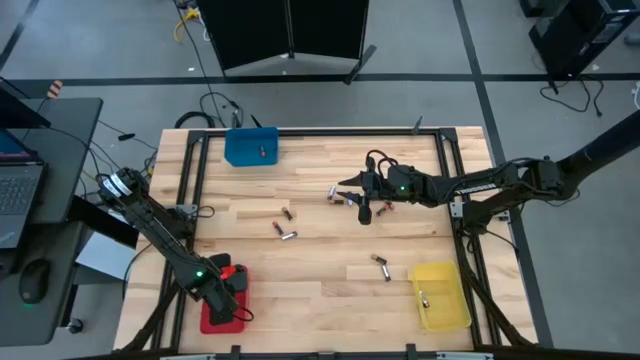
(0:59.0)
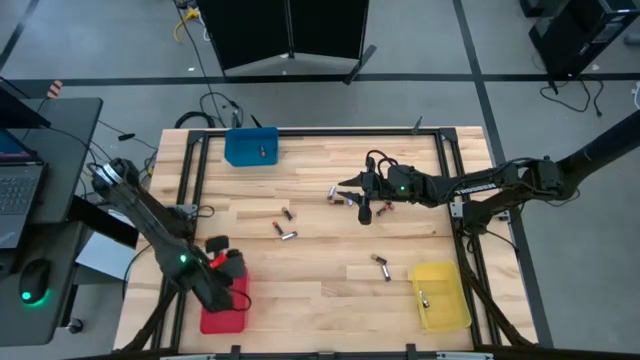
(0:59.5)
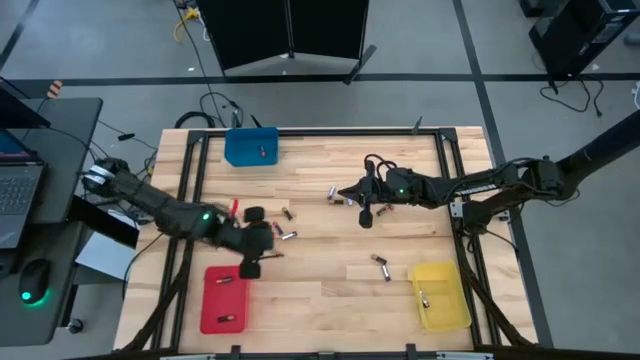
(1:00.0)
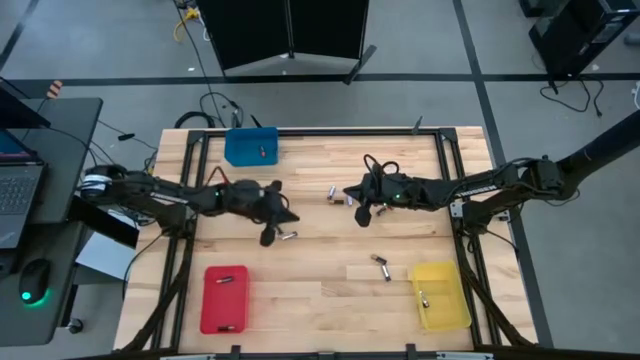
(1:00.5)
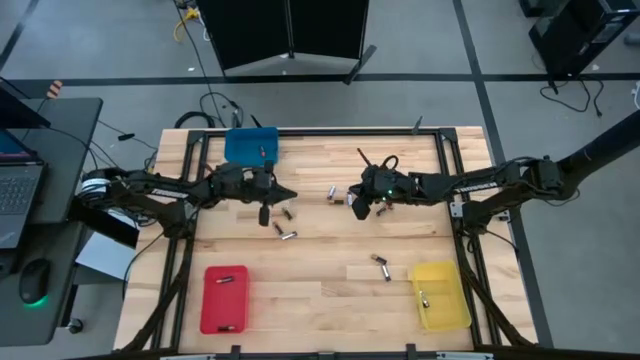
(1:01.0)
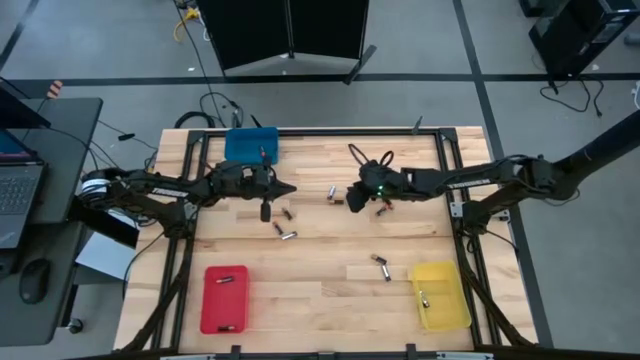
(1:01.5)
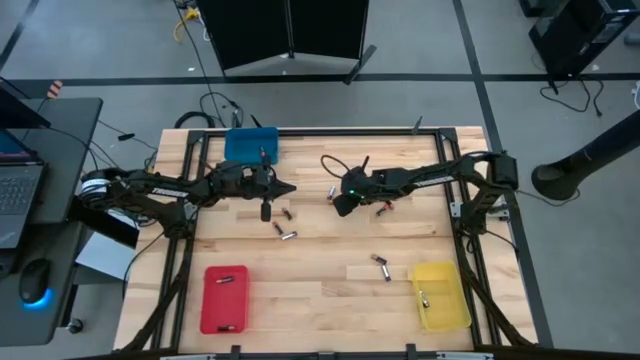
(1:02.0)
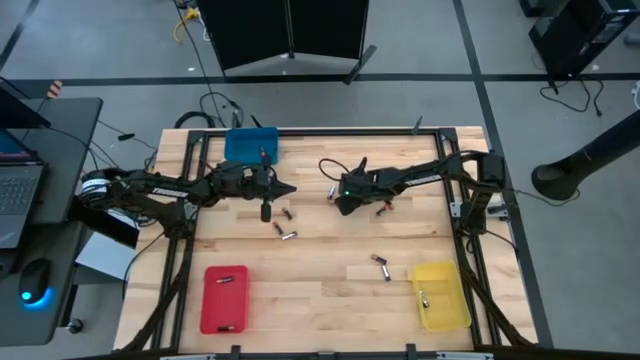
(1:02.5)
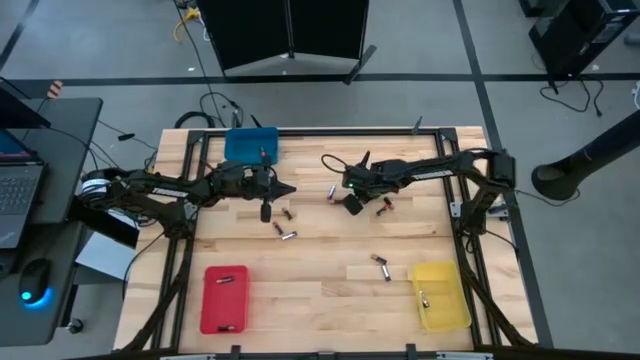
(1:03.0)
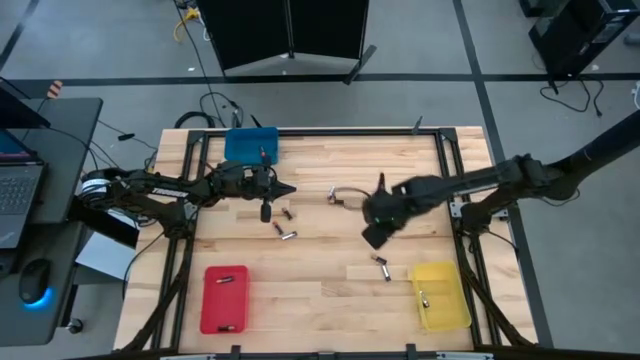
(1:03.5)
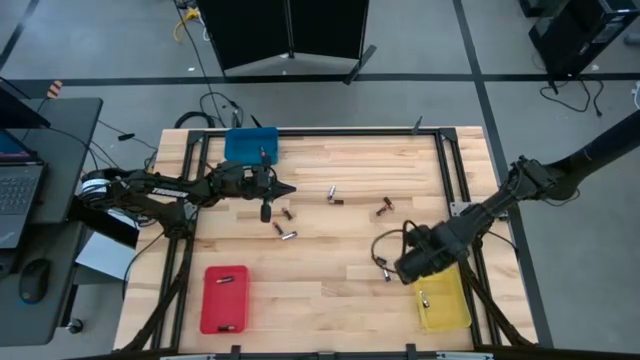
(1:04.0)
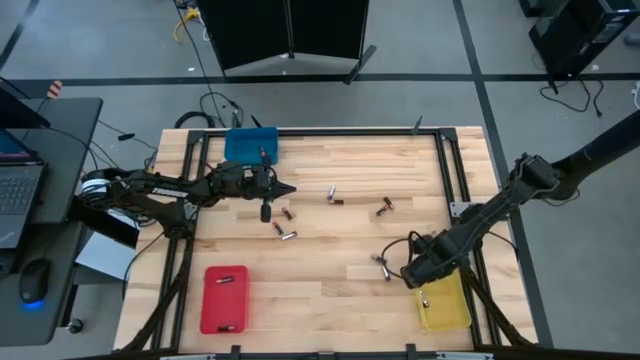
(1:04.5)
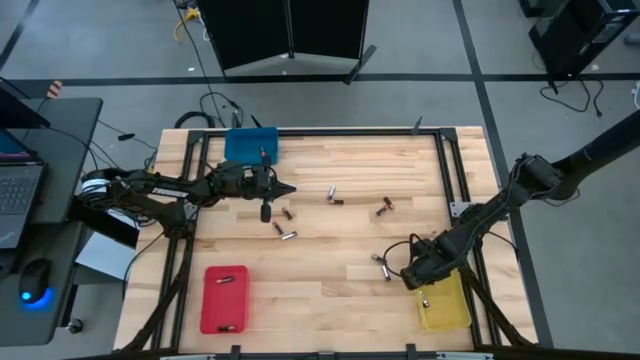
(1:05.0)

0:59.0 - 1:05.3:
Task: Sort batteries
Put the silver battery into the yellow bin

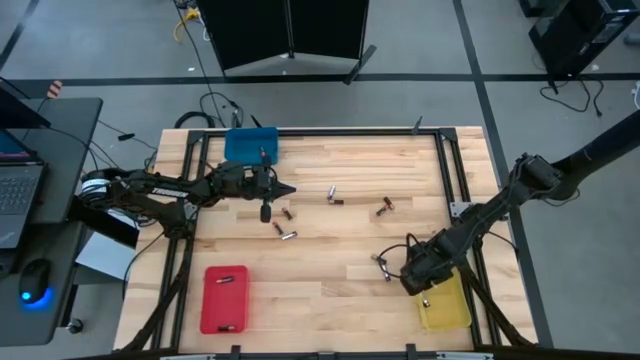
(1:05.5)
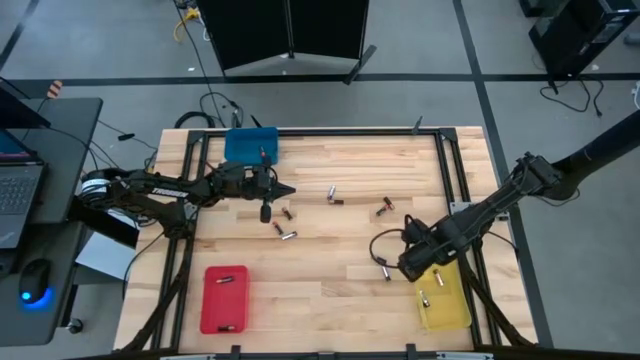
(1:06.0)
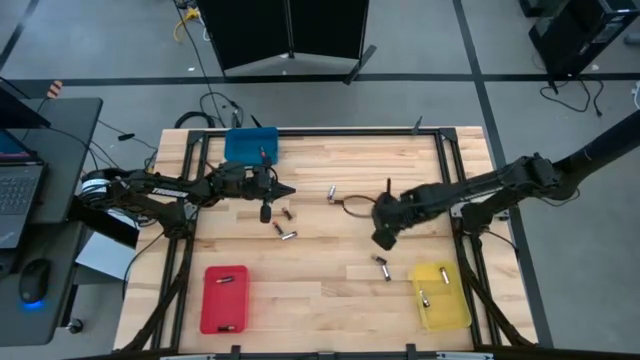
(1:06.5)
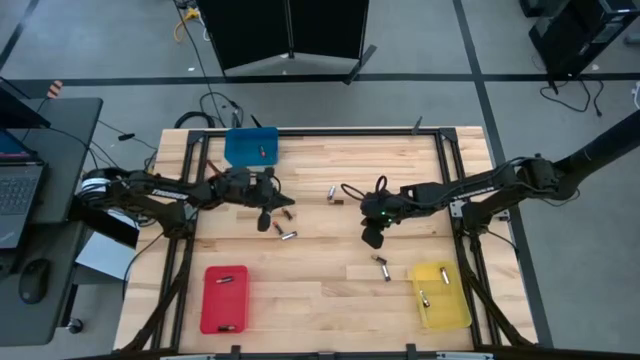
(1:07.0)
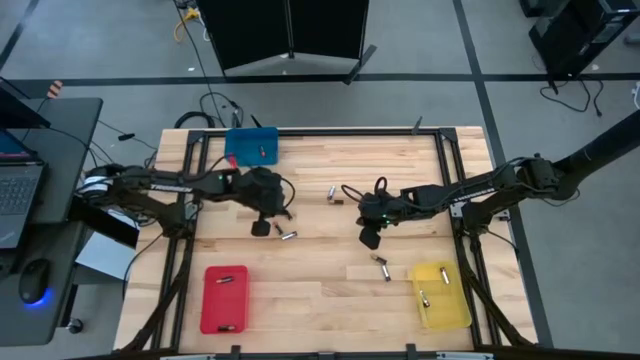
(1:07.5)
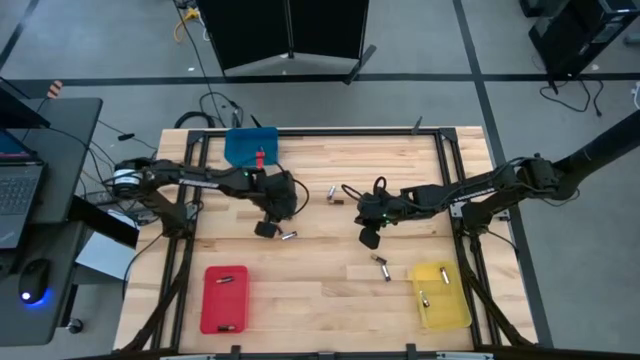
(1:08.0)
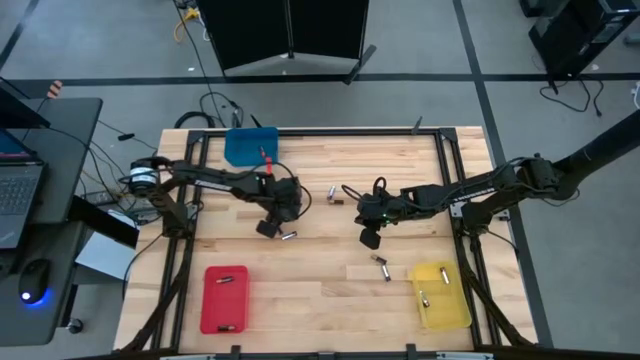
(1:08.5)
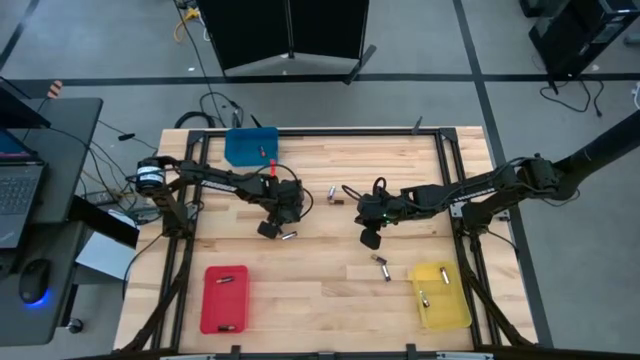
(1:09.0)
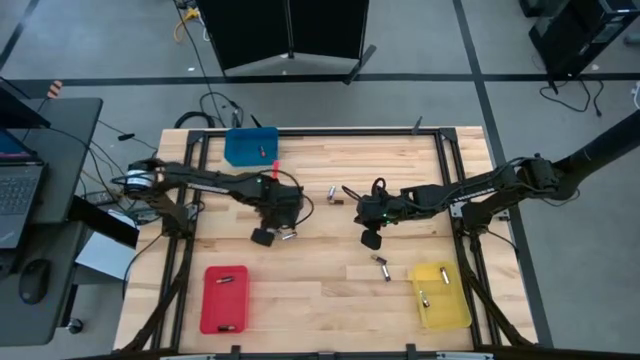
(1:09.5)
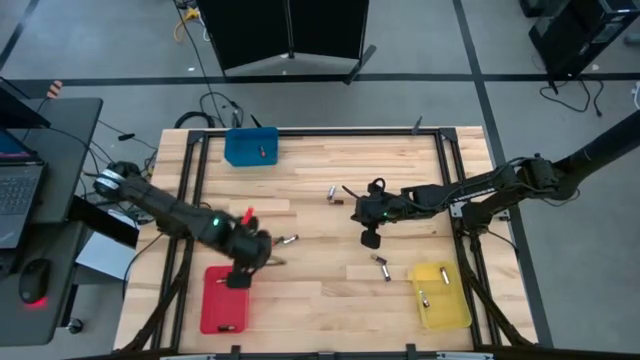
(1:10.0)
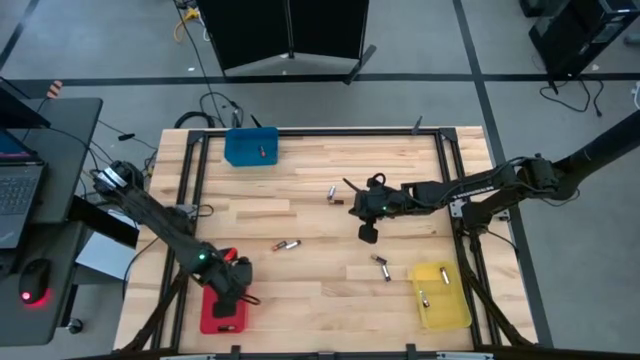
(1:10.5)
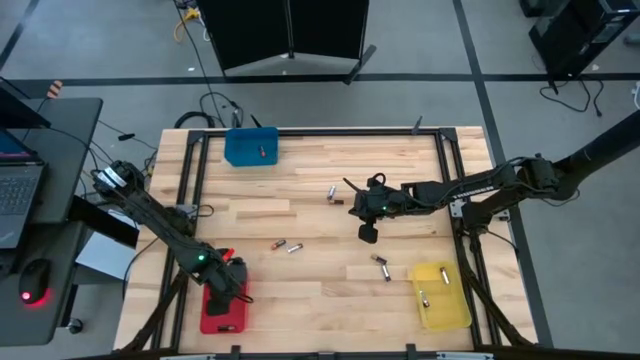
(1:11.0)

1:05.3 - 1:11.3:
Put the brown battery into the red bin

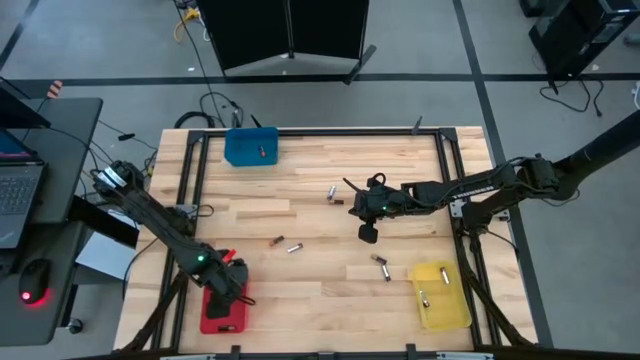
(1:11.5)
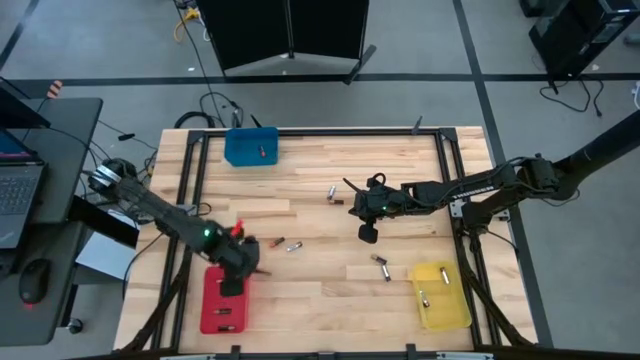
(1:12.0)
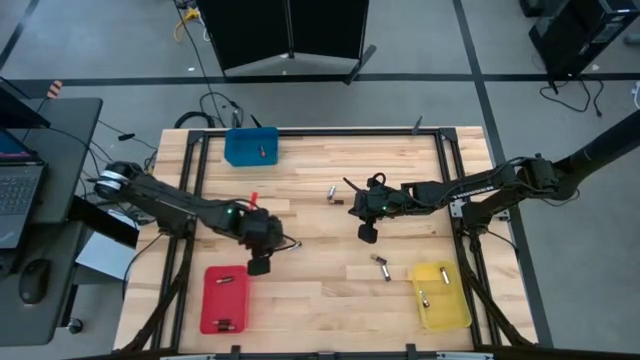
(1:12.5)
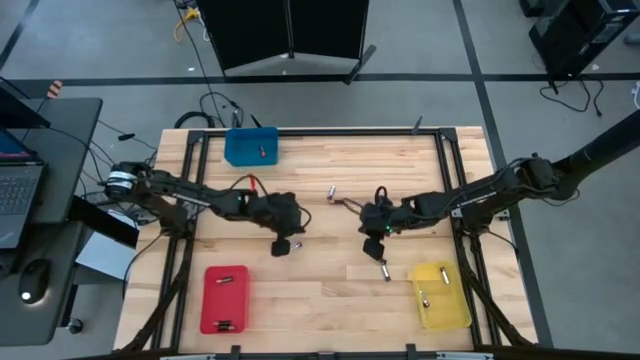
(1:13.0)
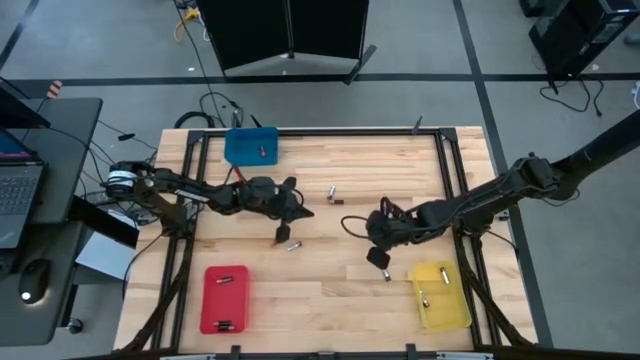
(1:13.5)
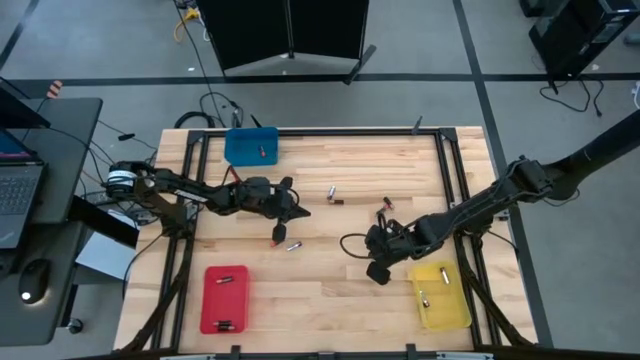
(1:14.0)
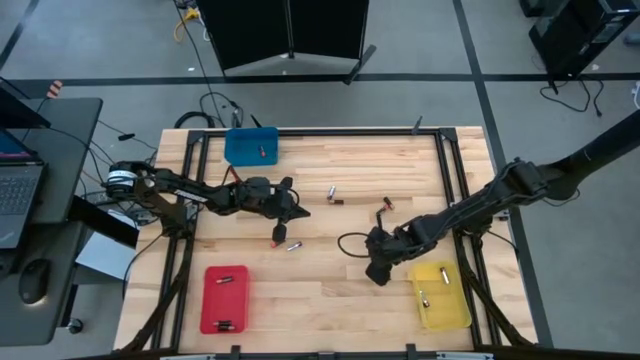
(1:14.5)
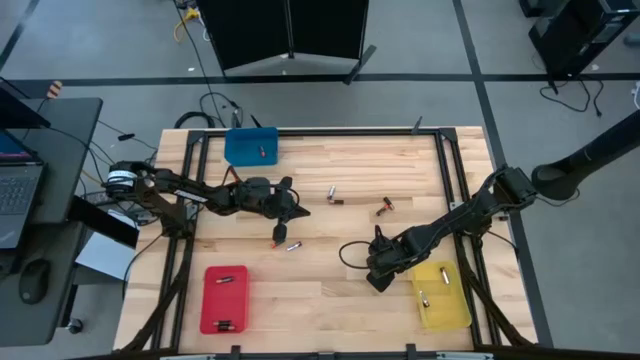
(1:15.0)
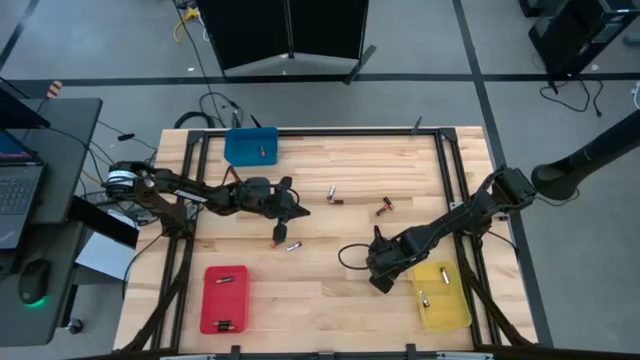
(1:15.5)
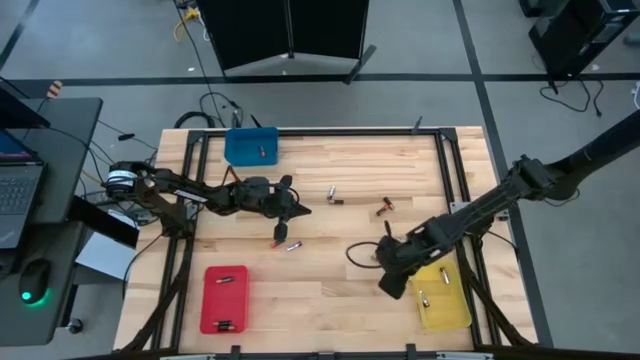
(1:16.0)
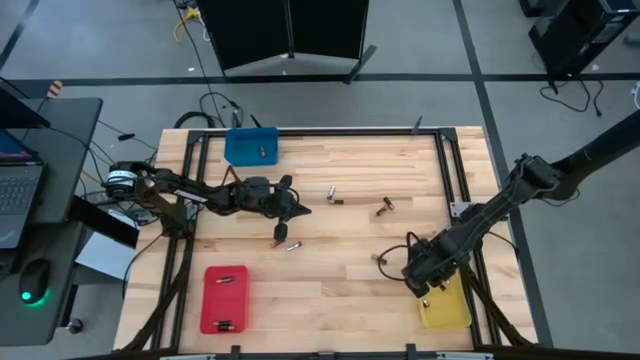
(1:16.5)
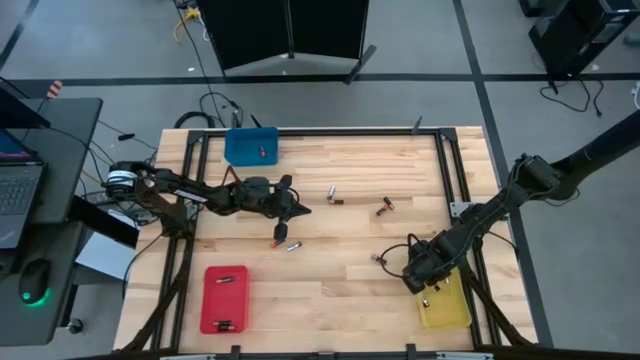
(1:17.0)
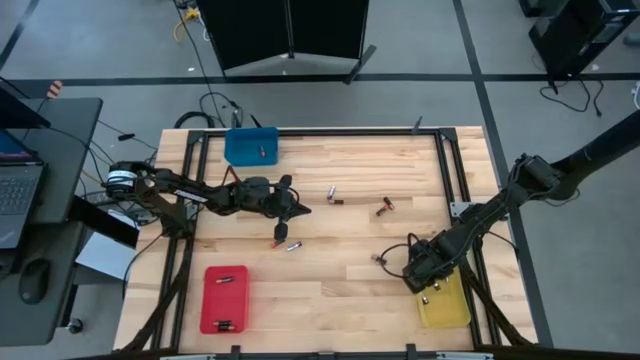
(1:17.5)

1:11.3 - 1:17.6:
Put the silver battery into the yellow bin

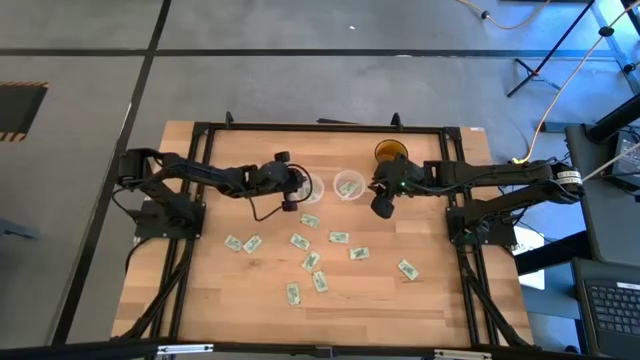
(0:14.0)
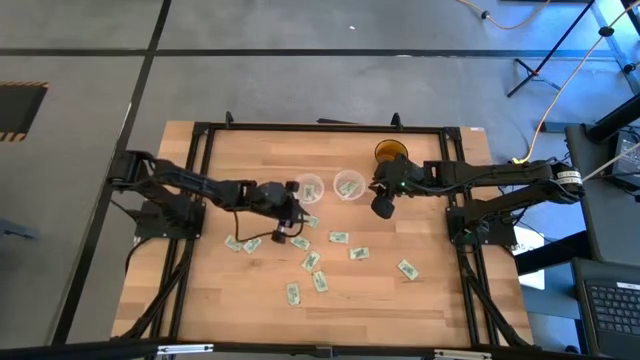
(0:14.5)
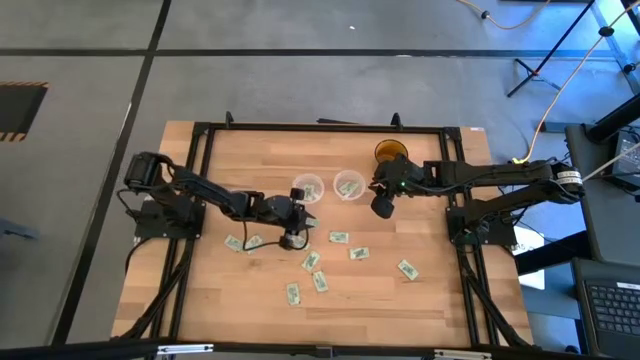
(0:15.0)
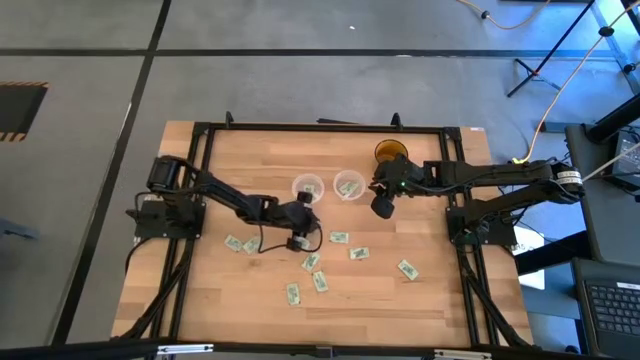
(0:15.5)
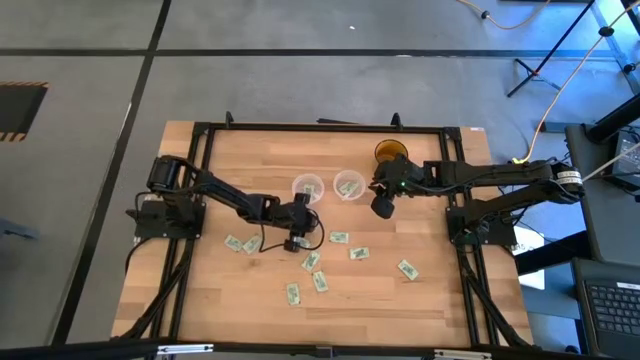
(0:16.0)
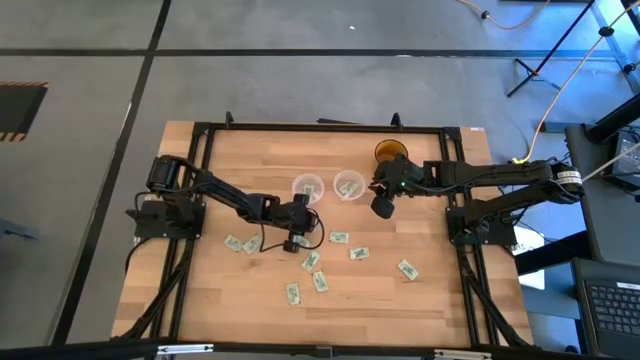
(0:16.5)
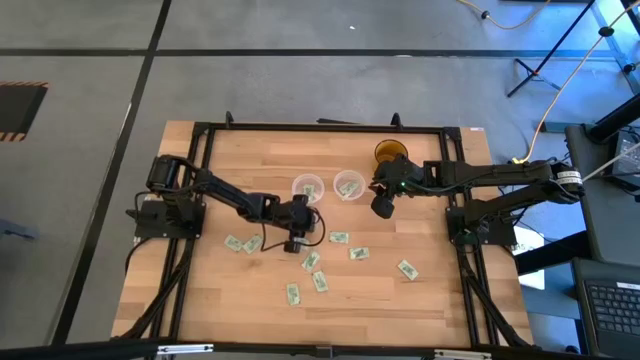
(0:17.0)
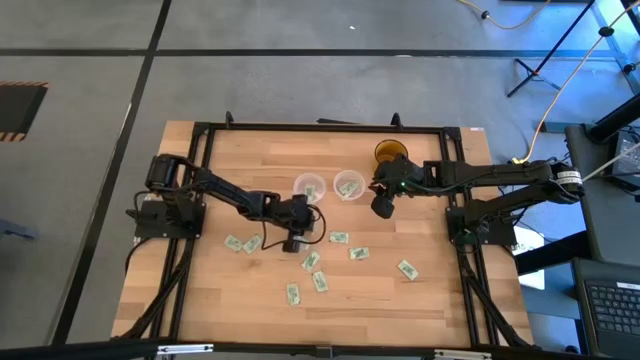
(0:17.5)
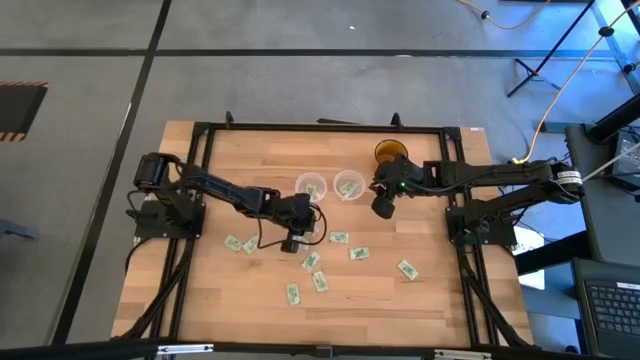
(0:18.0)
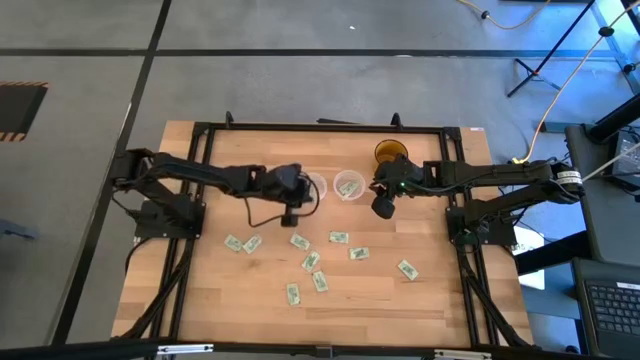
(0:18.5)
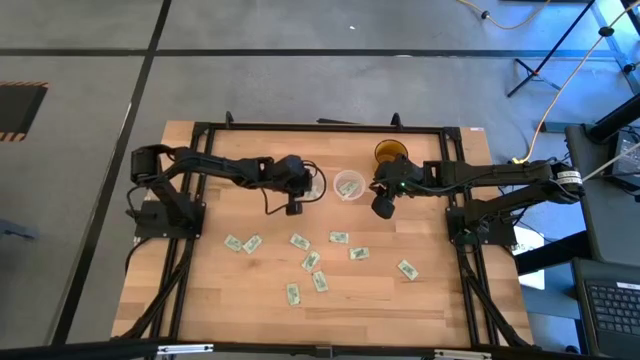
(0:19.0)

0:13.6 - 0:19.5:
Task: Pick and place Stevia / Truvia into bins
Put the stevia packet into the left transparent container
